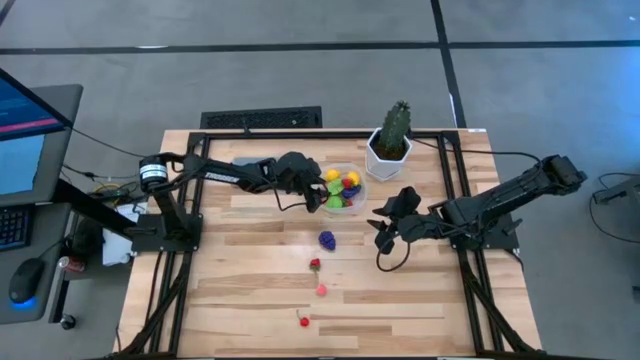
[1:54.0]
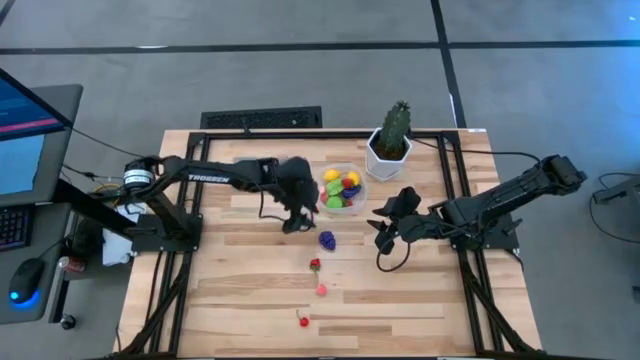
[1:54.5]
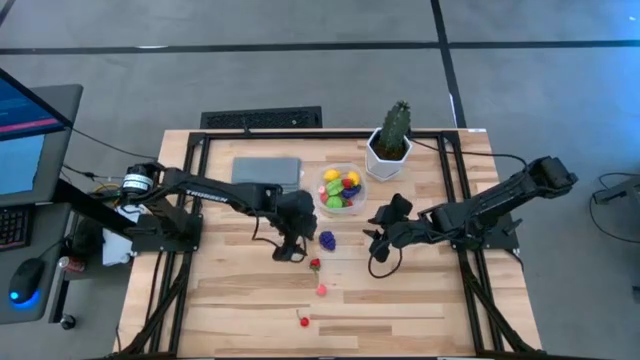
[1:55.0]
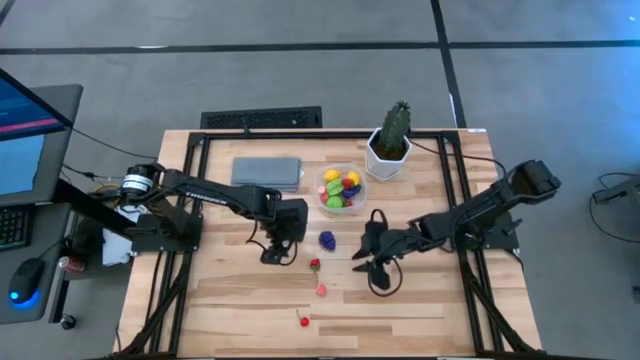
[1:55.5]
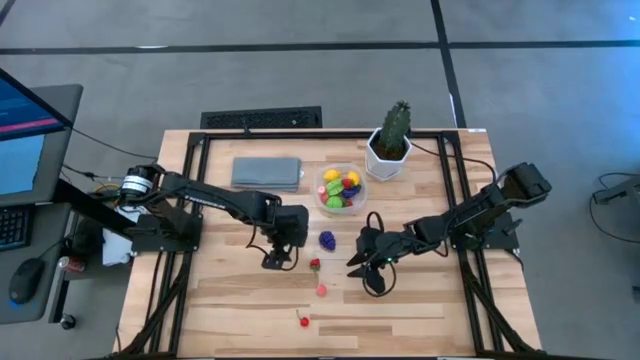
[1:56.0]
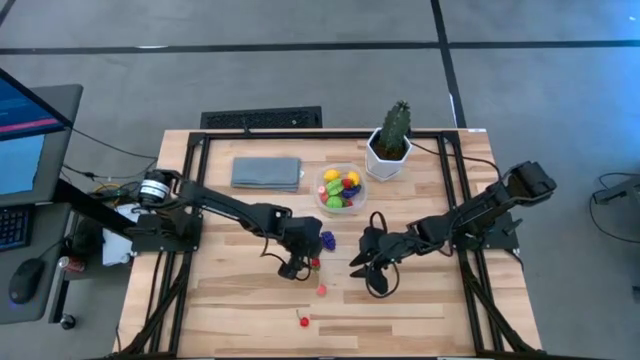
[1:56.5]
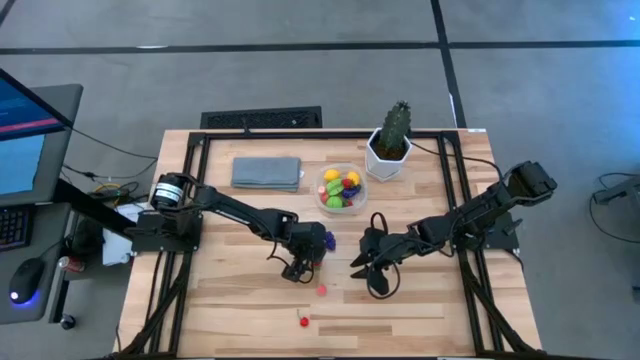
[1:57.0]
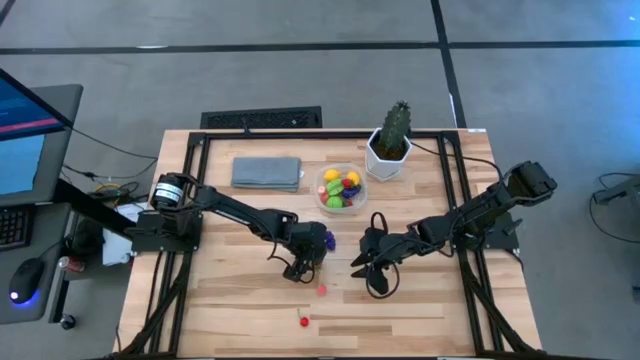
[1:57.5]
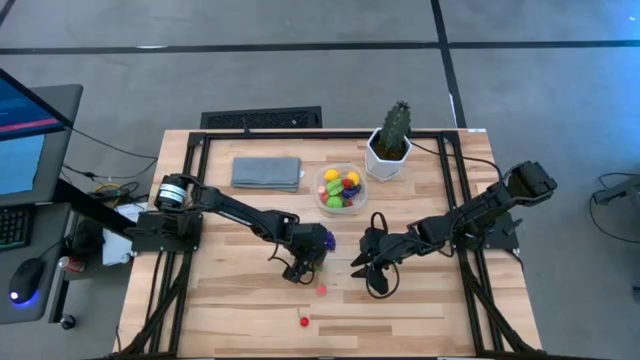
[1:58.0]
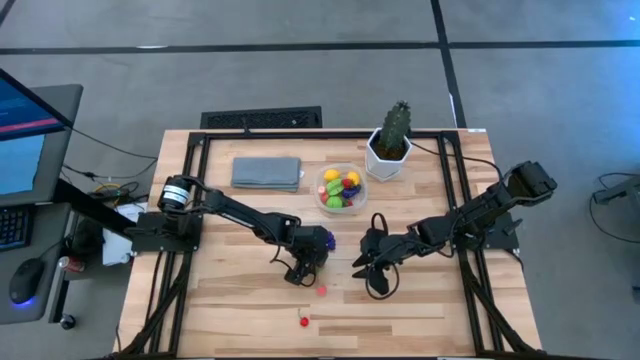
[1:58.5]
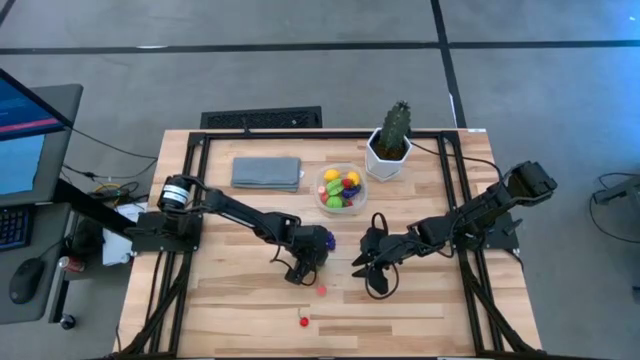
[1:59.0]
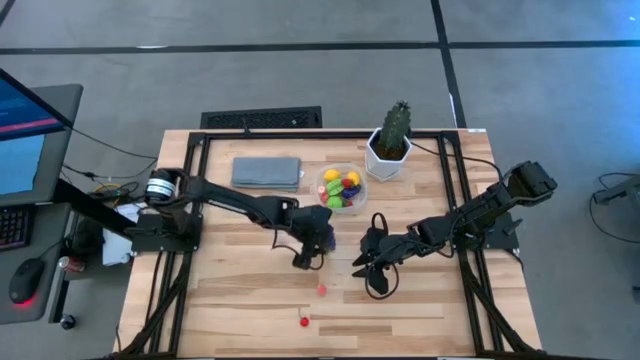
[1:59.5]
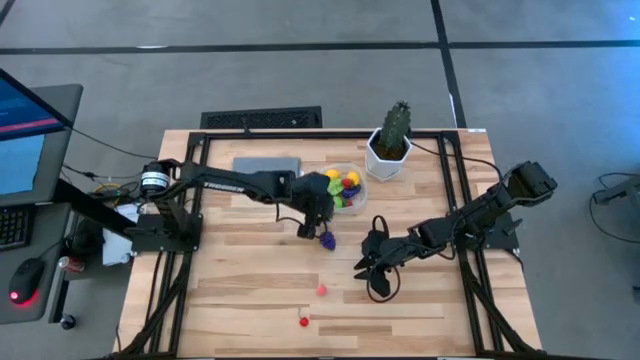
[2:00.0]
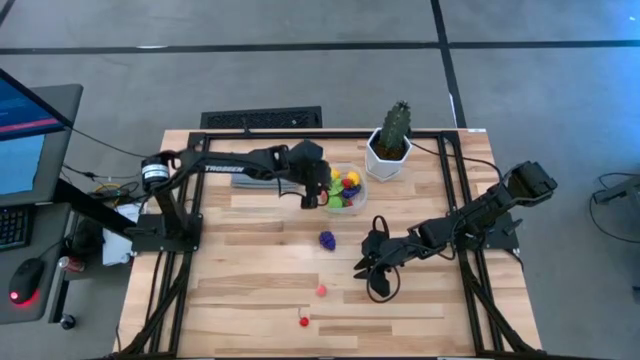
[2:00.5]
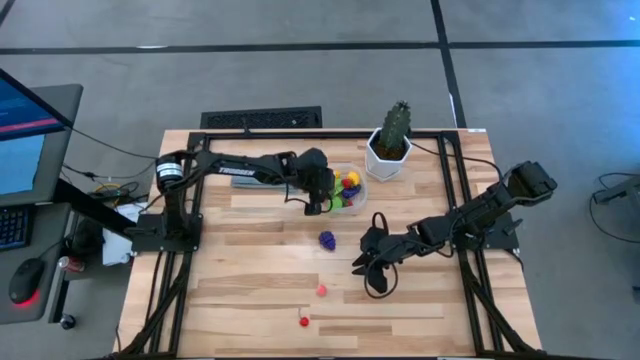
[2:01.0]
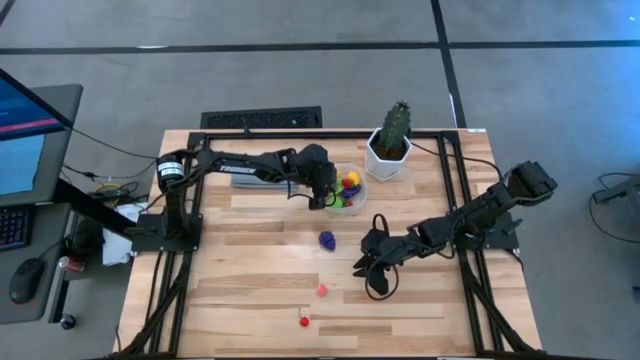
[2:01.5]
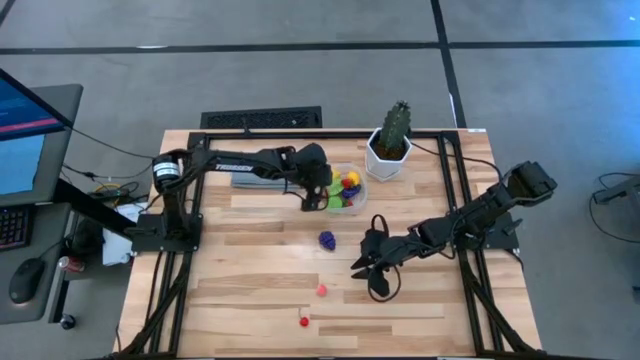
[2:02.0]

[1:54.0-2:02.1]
Task: Pick and placing Produce into tupperware
Put the strawberry into the transparent bin

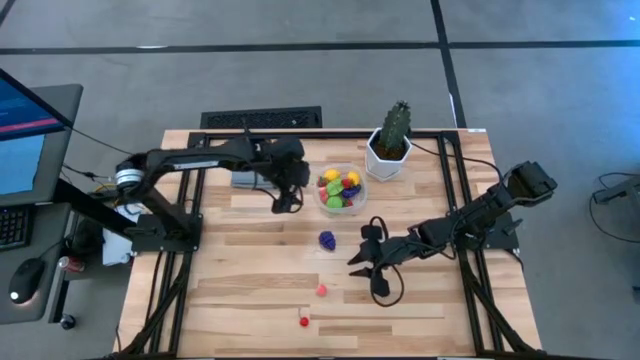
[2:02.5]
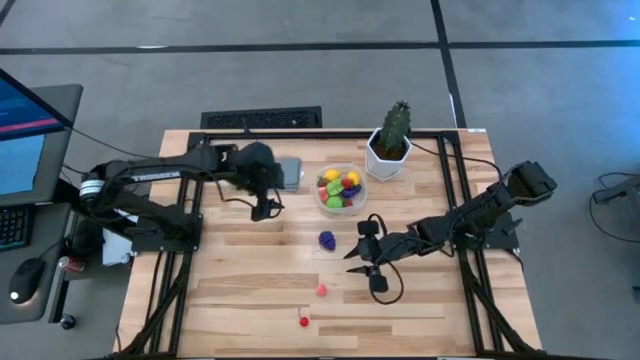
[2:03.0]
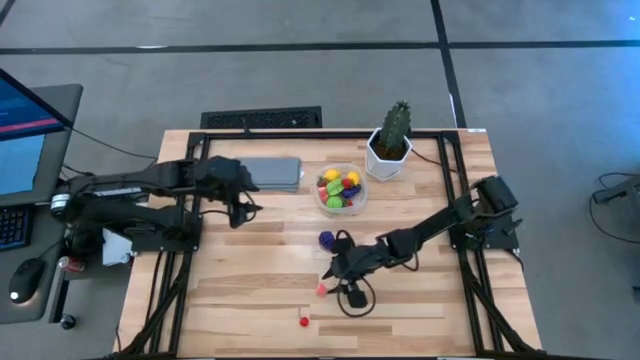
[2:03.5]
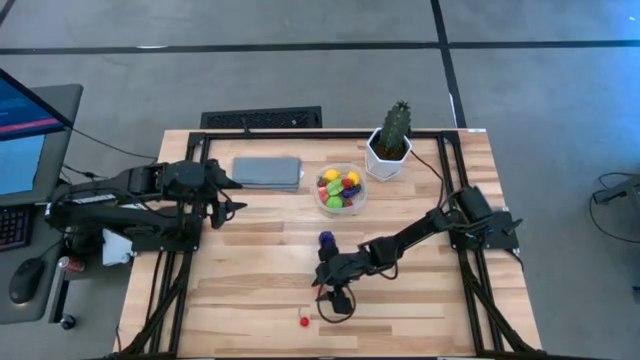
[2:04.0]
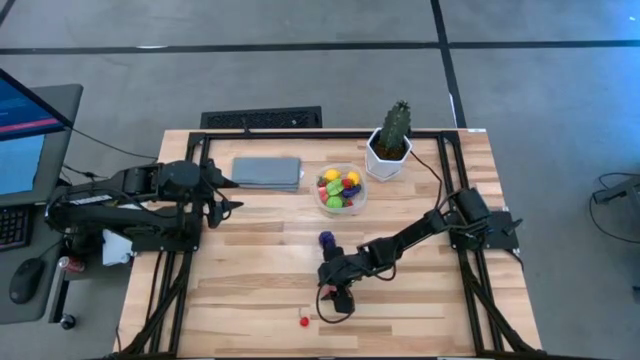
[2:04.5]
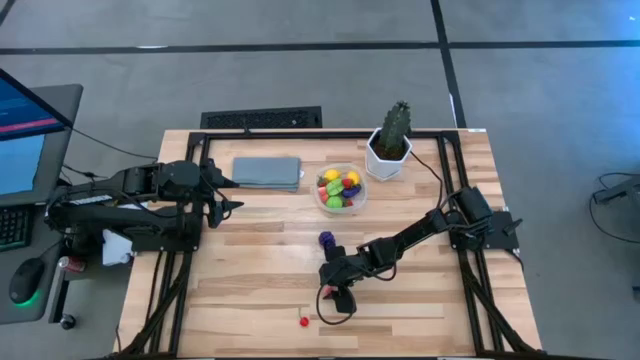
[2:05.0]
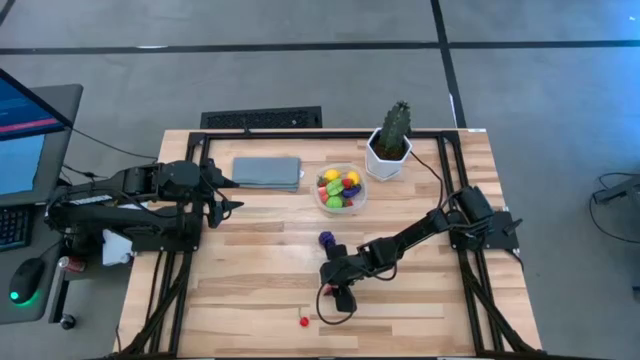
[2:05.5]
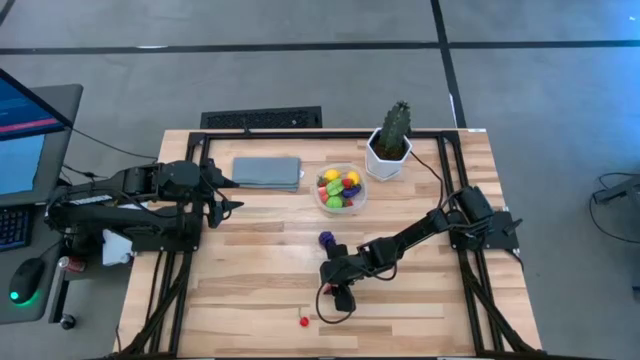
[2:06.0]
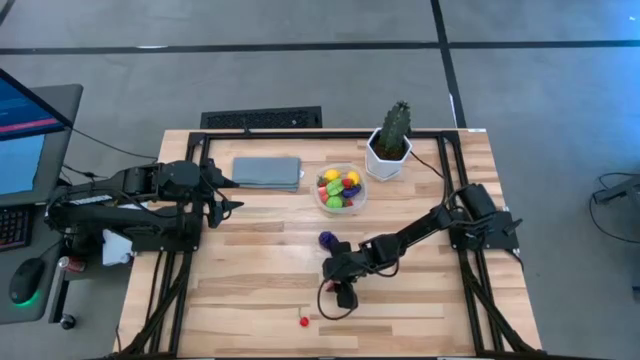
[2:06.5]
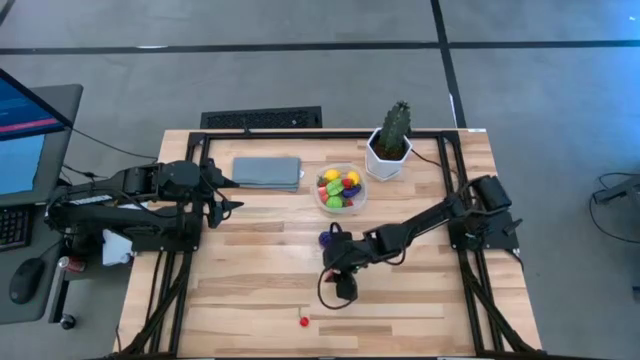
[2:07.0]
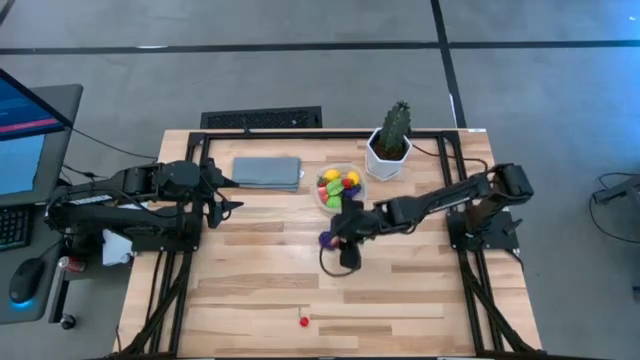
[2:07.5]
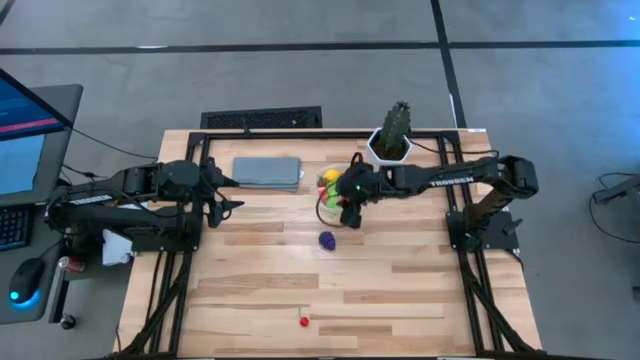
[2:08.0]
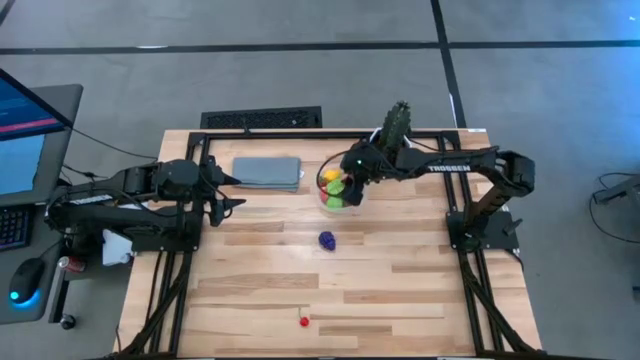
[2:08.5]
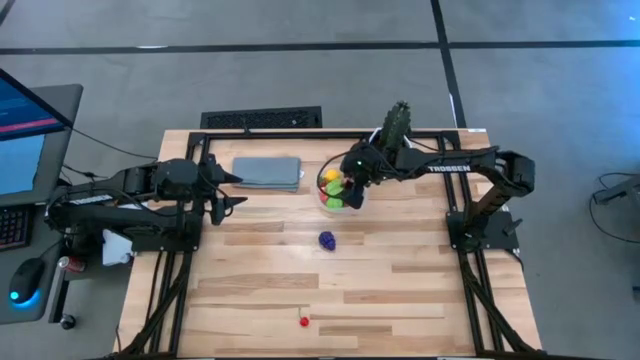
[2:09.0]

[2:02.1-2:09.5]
Put the peach into the transparent bin

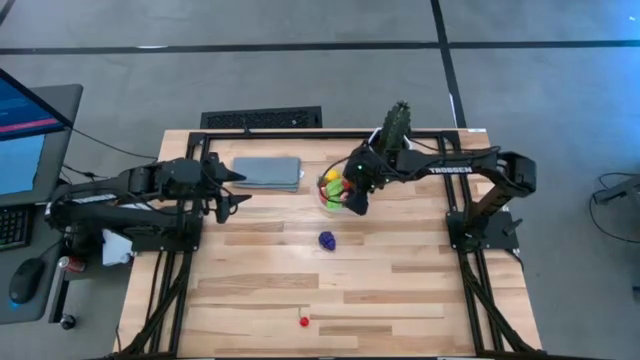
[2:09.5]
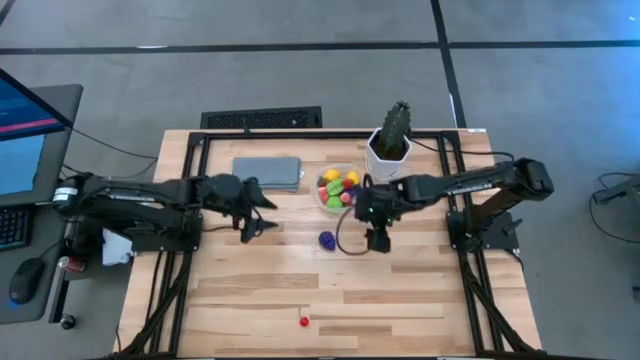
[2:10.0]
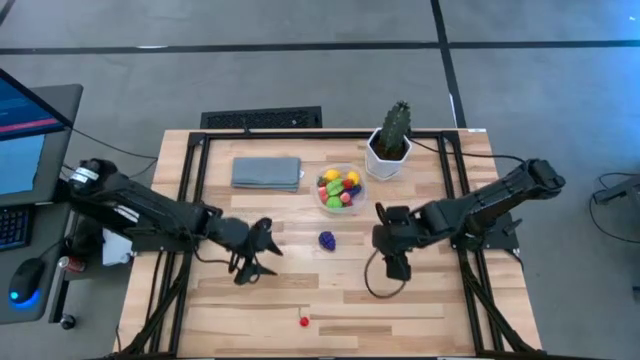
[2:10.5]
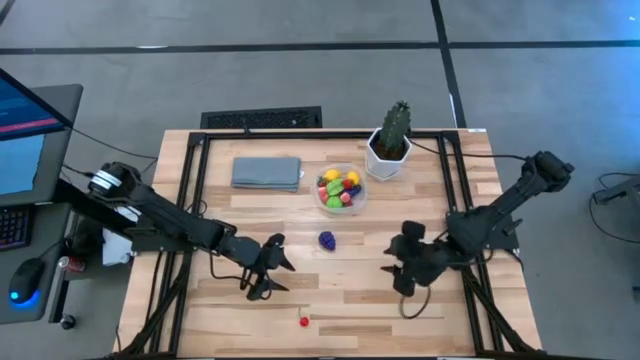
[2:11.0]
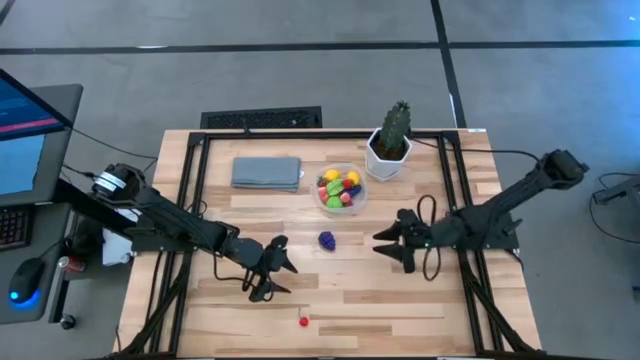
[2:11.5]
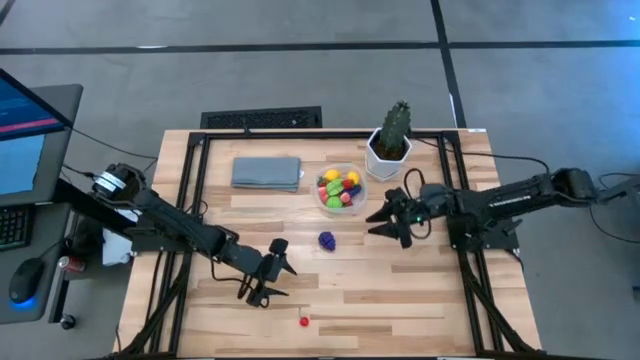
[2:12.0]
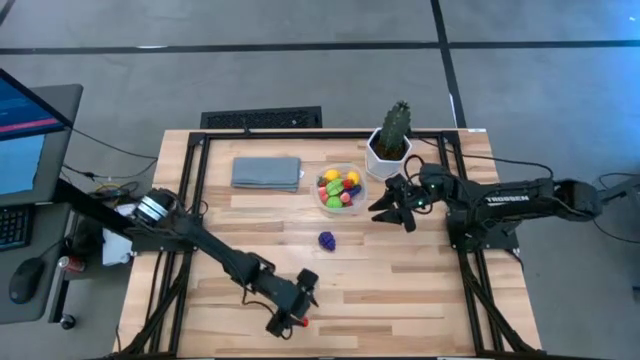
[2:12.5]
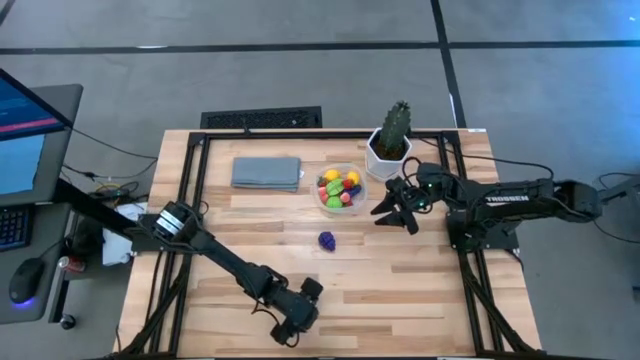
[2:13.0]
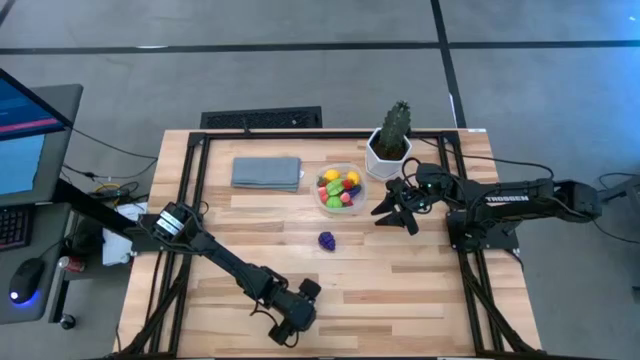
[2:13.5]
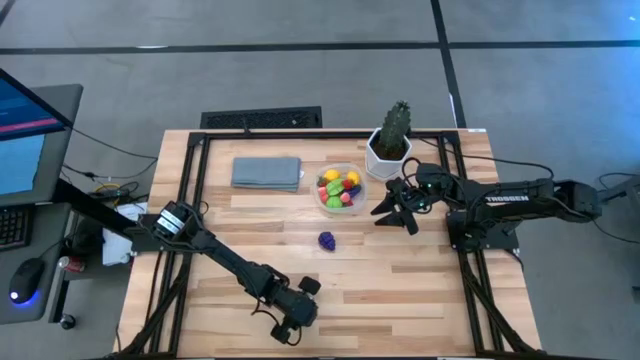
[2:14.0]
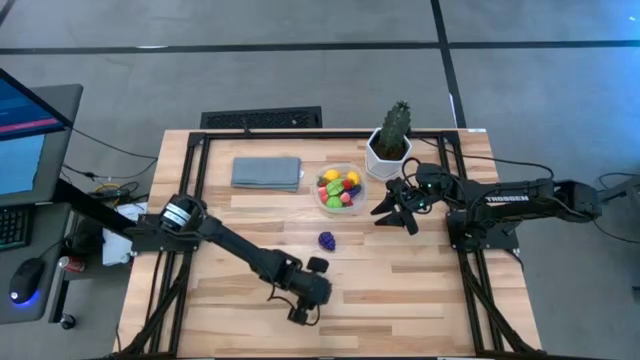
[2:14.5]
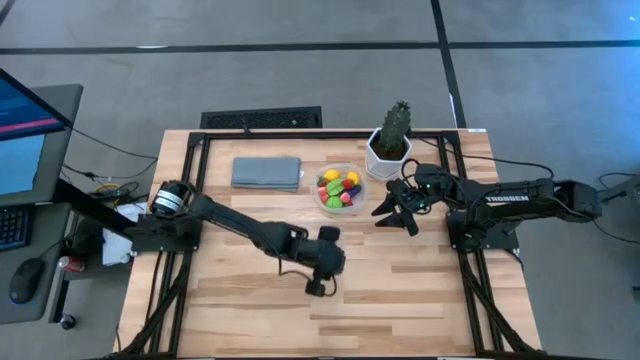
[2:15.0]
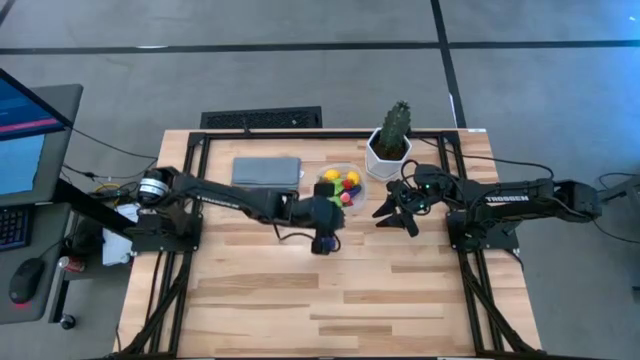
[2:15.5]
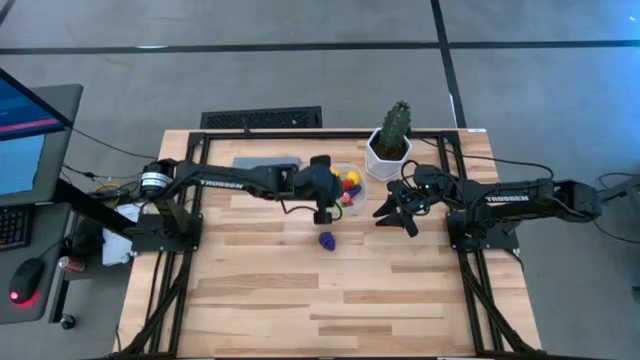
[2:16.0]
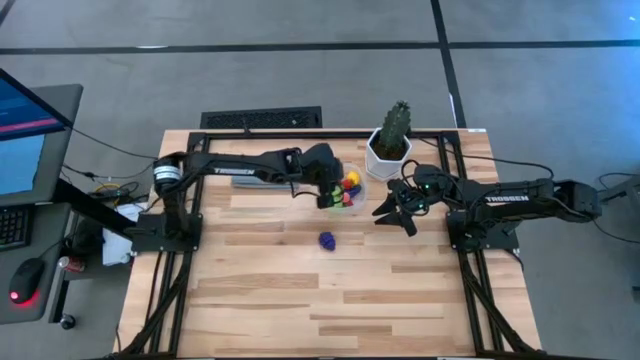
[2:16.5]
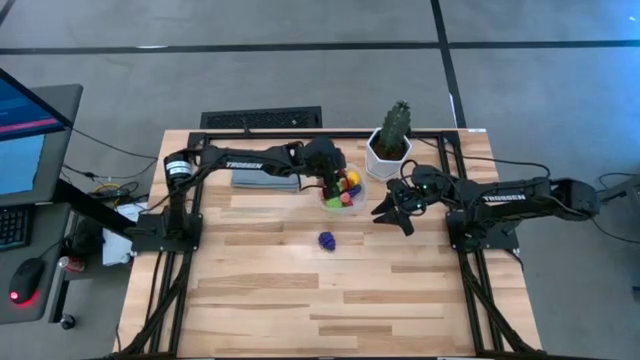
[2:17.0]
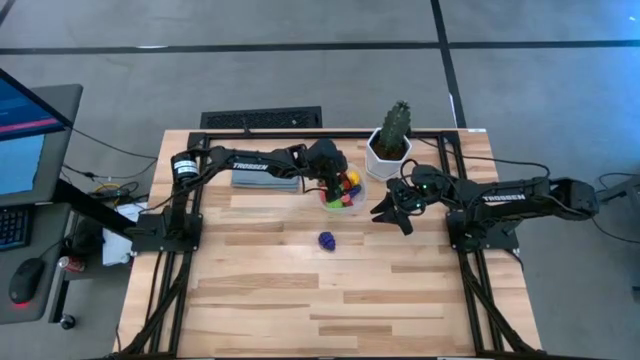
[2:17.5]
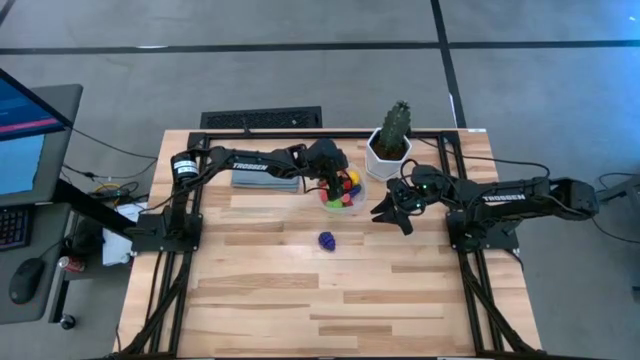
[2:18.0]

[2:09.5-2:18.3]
Put the cherry into the transparent bin
